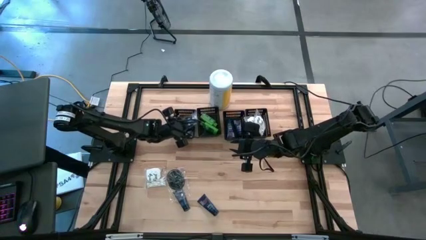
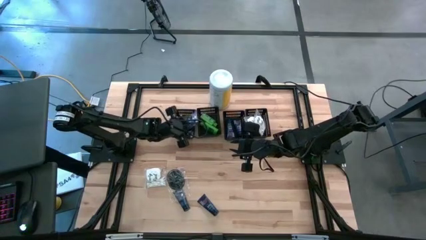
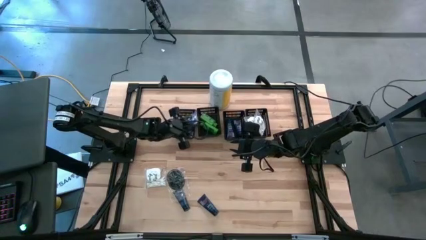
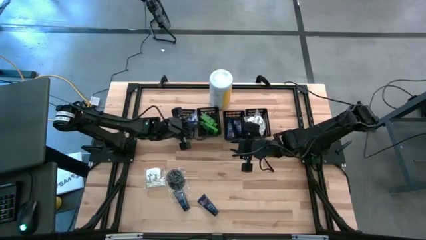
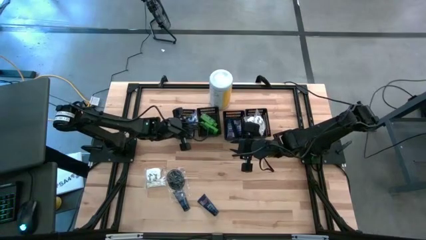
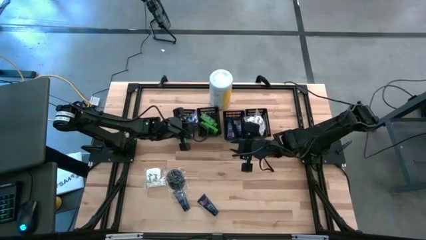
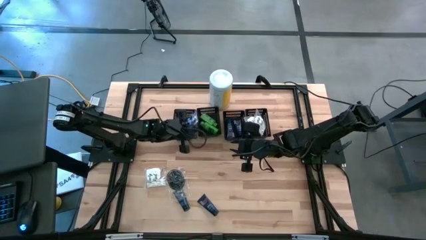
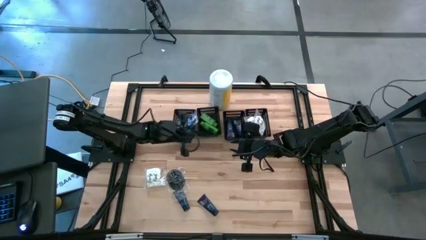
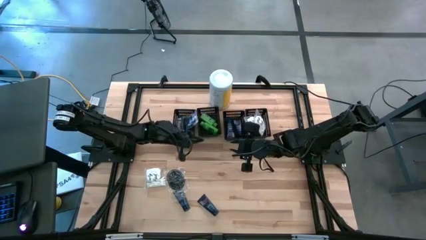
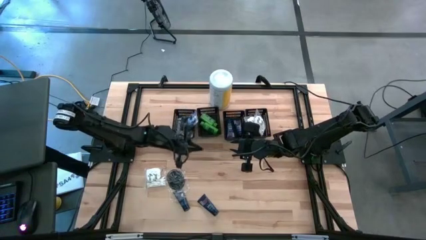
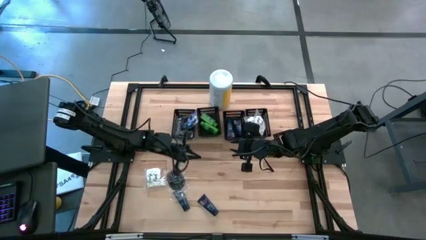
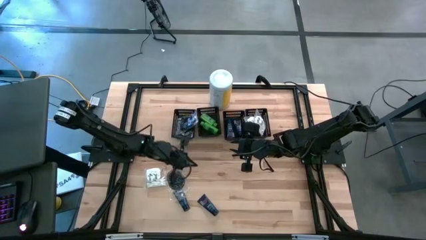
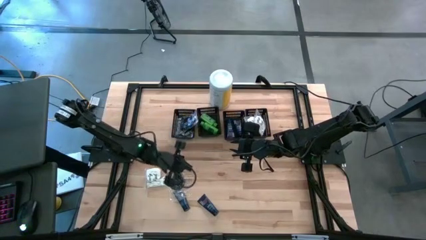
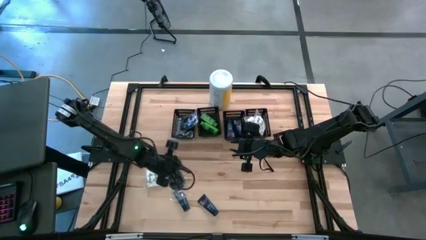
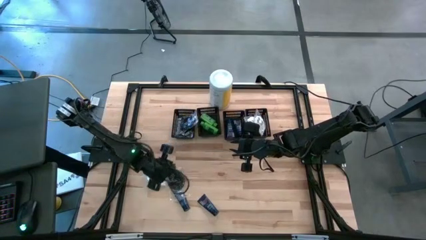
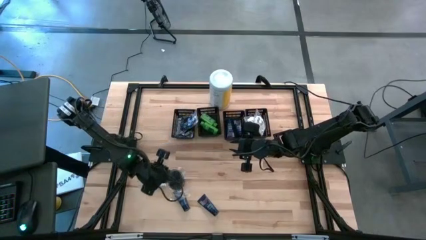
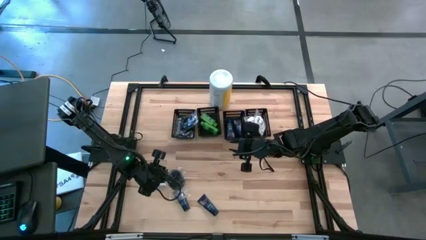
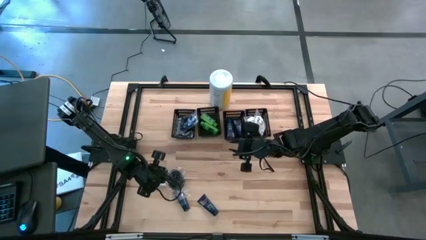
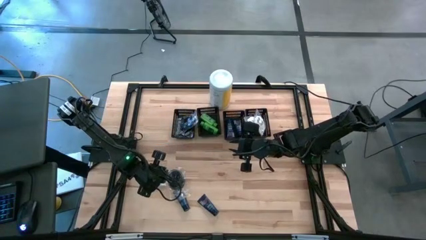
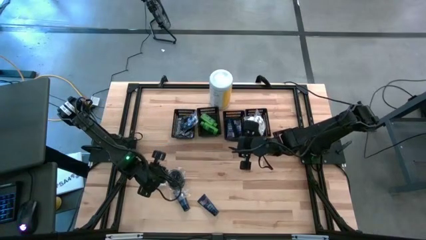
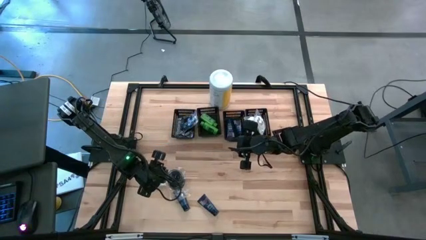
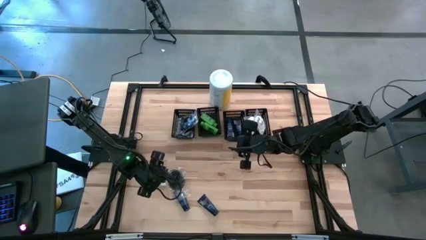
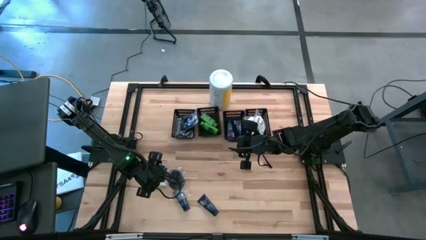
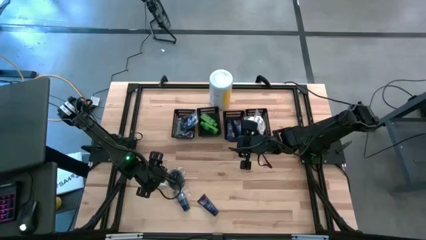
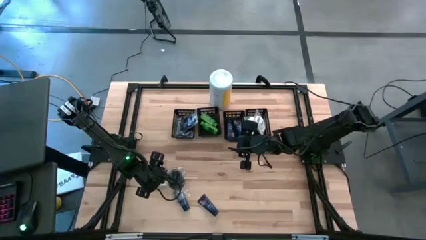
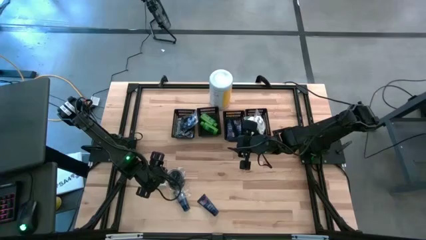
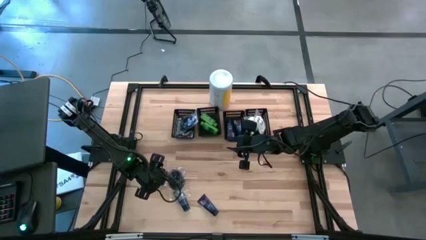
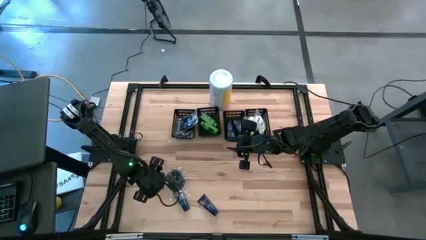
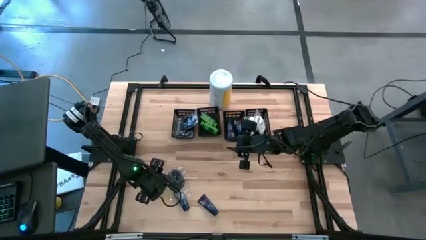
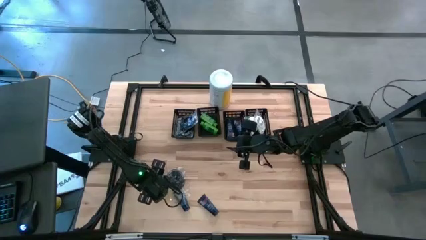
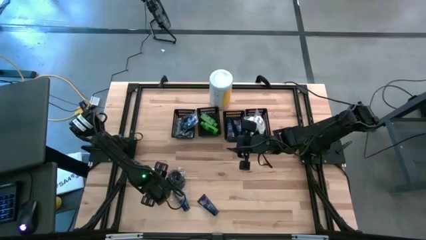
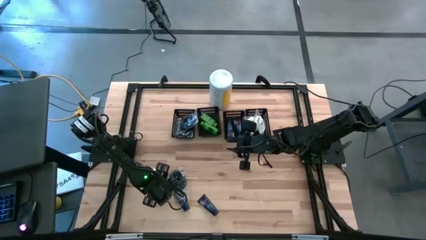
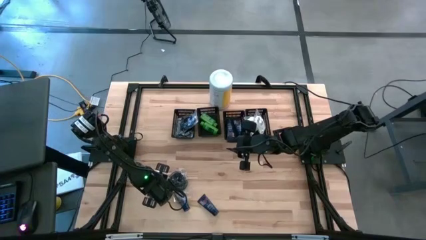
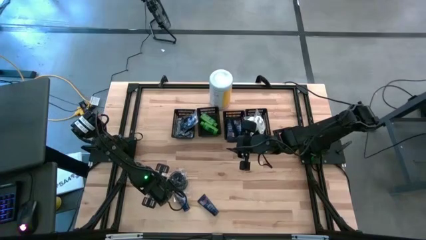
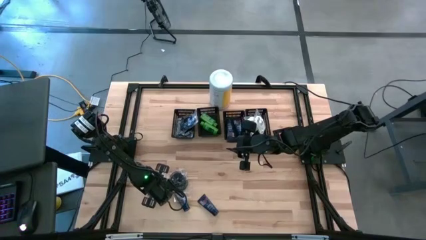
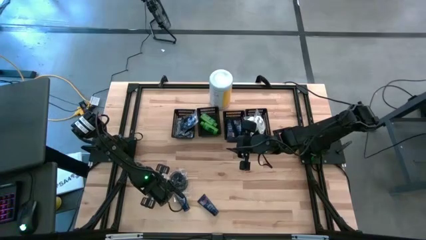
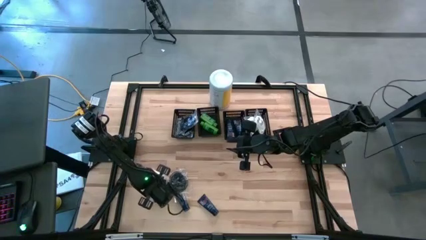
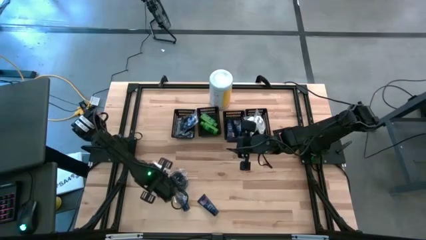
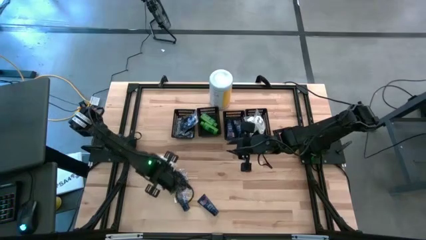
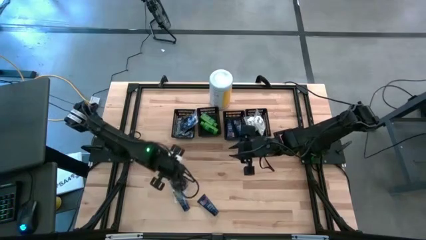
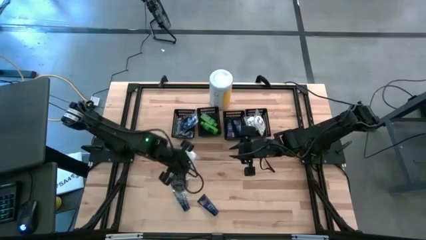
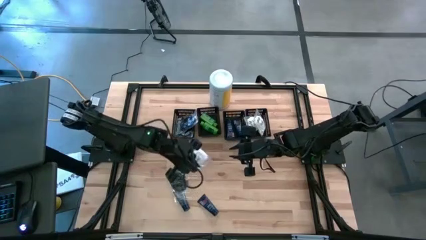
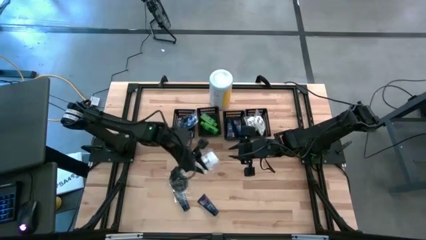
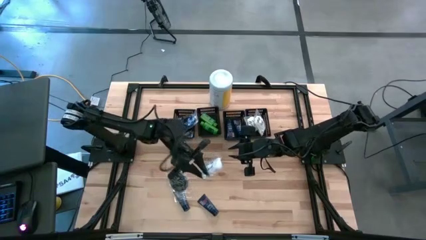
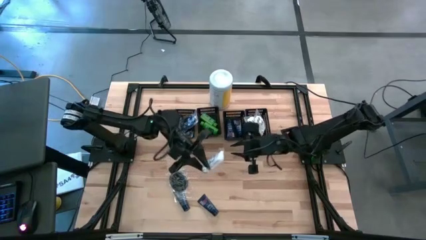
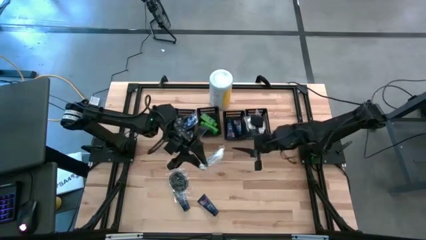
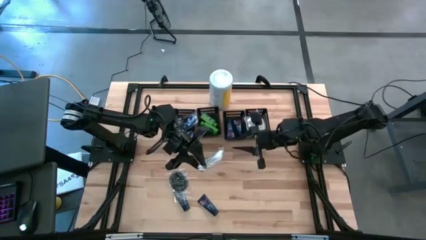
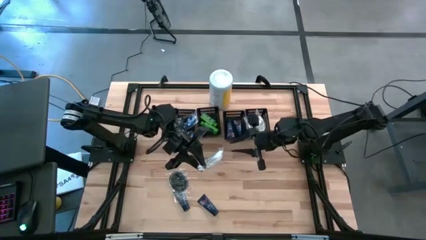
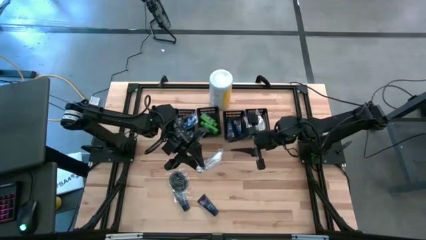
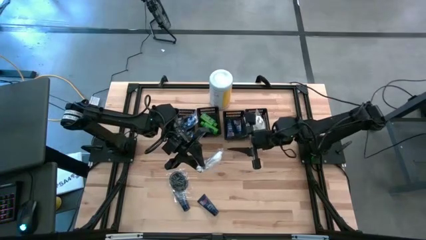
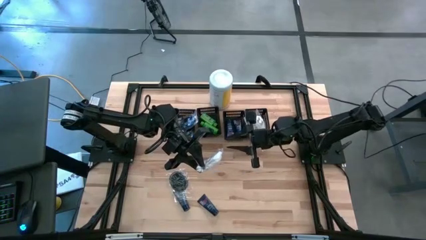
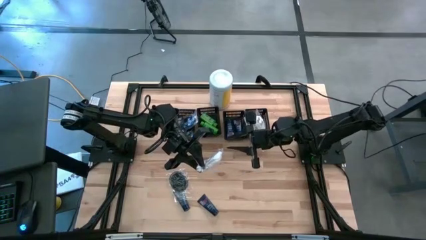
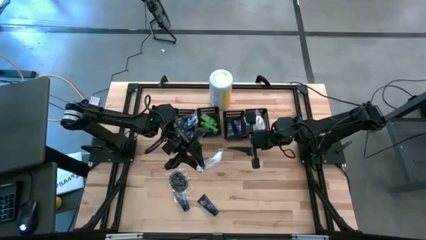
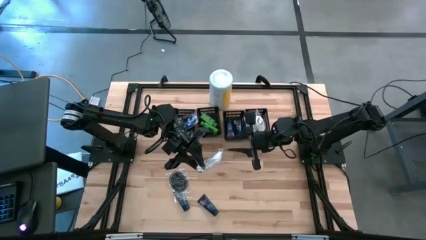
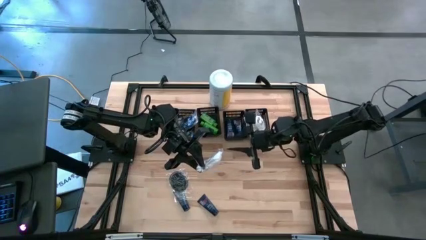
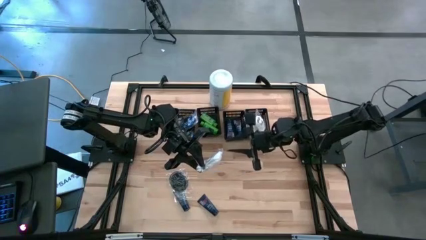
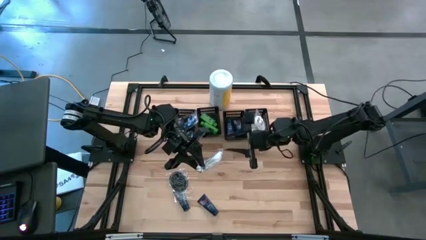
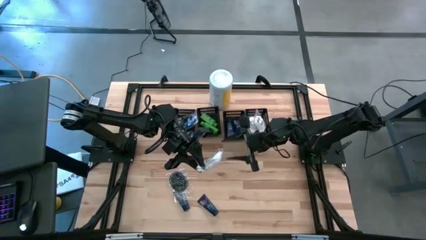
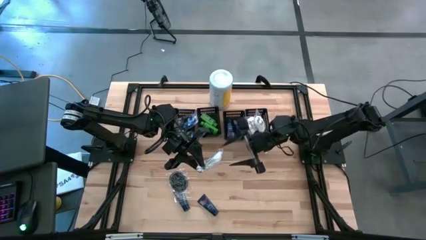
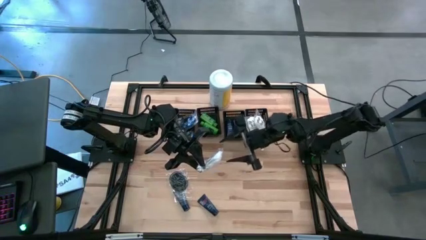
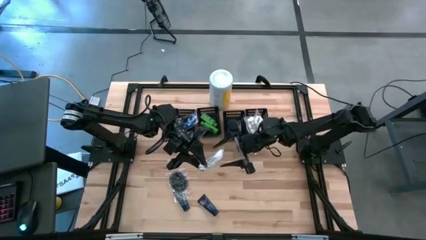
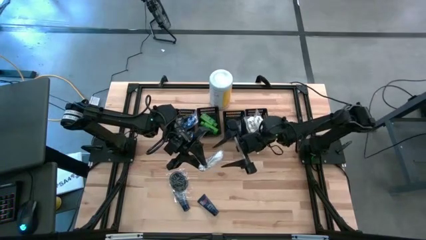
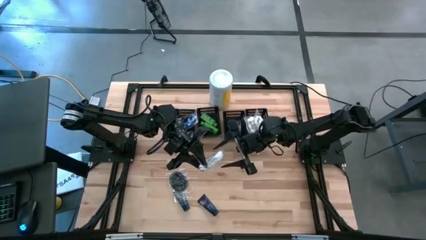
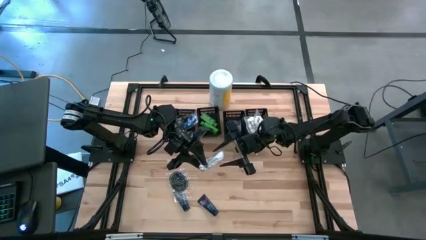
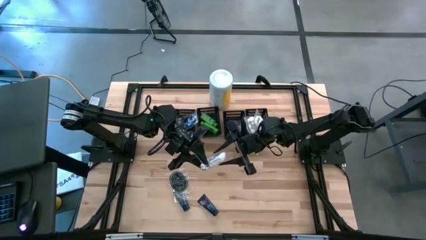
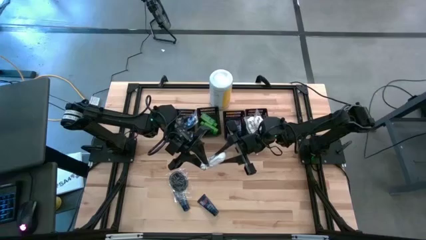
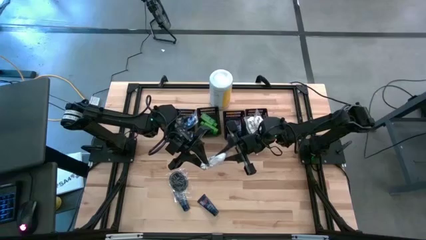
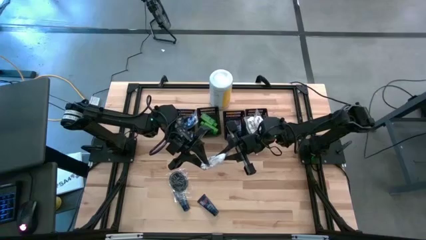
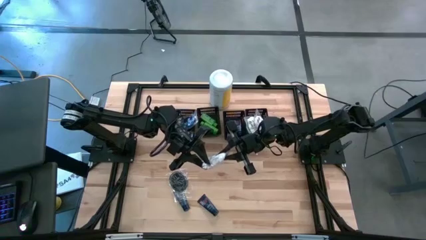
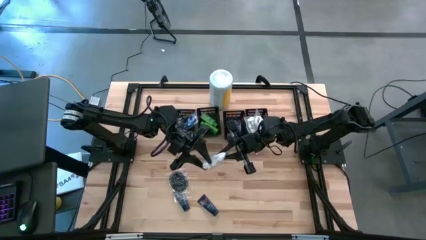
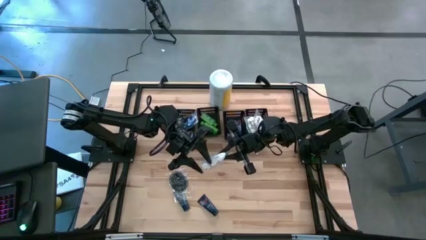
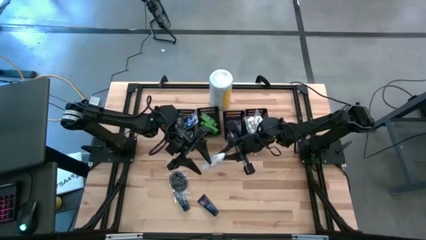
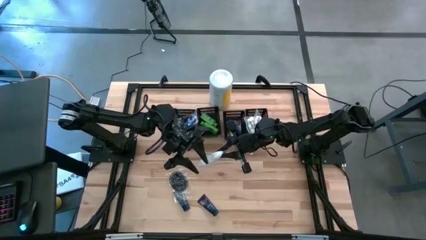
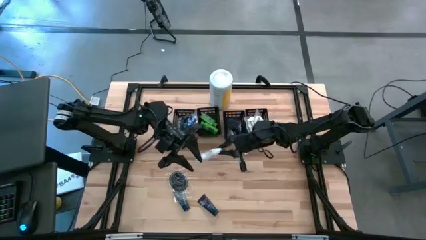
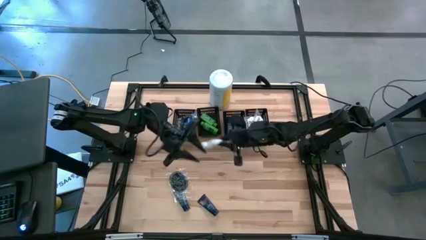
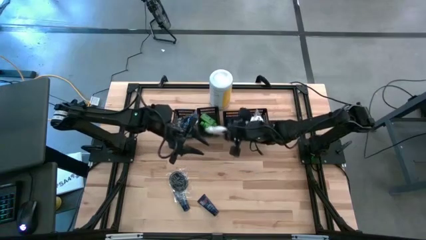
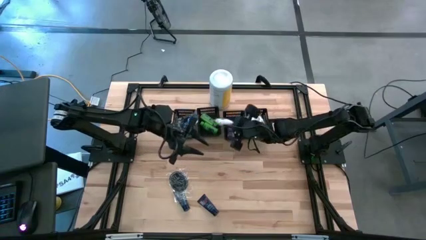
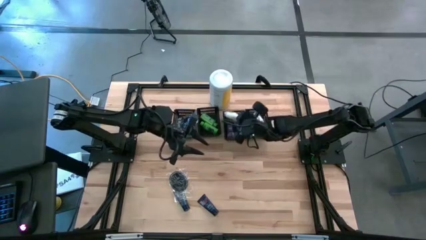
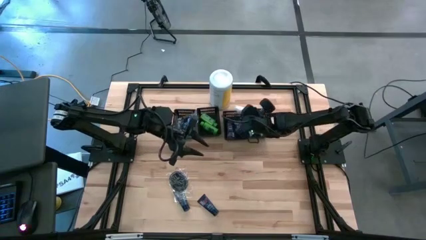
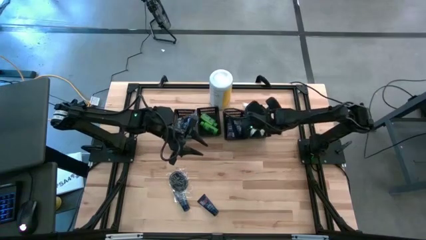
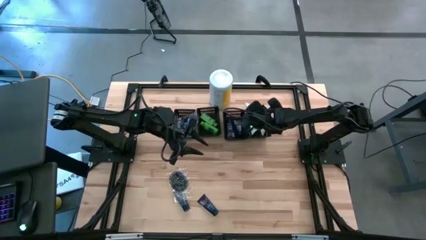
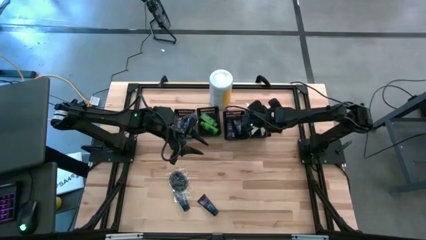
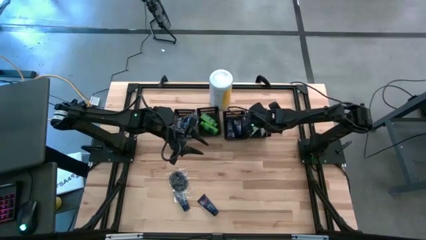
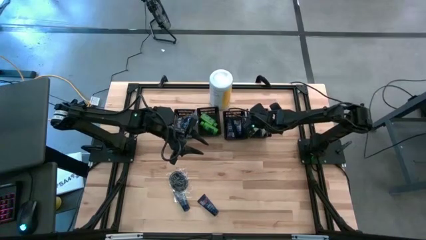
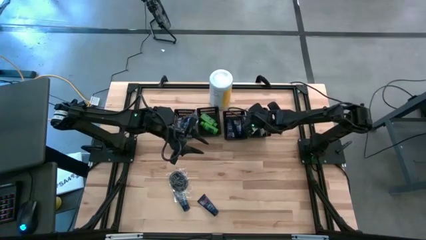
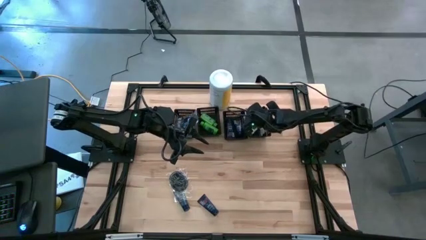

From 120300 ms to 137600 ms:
Task: Pick & Place Travel size toiletries
Put the cotton pack into the right black bin
